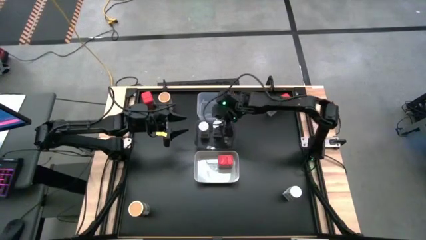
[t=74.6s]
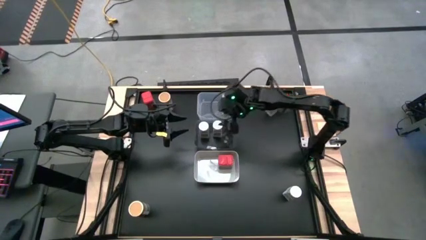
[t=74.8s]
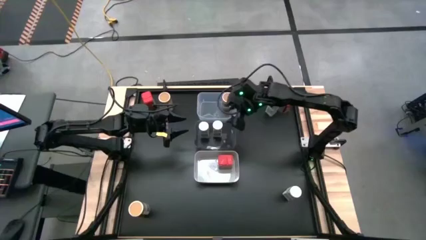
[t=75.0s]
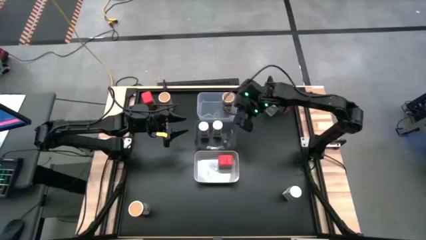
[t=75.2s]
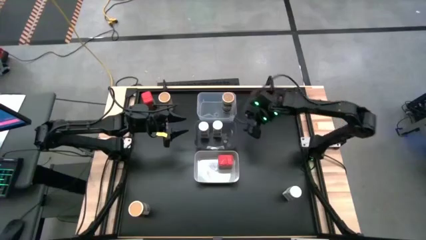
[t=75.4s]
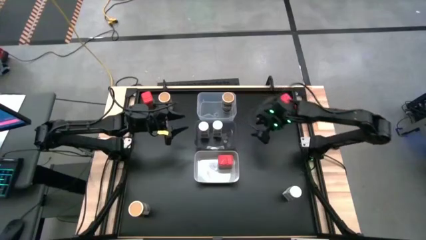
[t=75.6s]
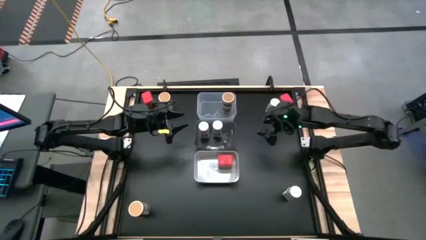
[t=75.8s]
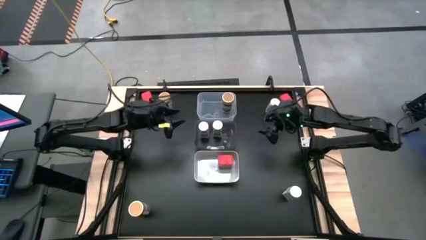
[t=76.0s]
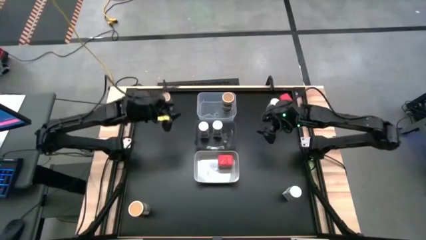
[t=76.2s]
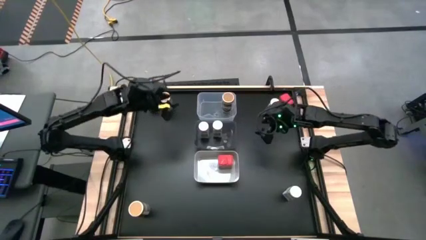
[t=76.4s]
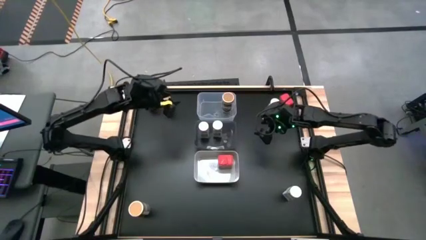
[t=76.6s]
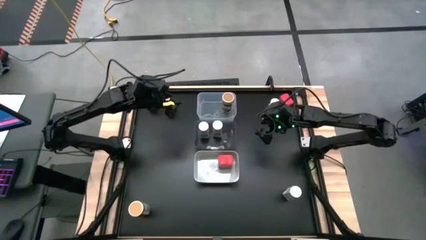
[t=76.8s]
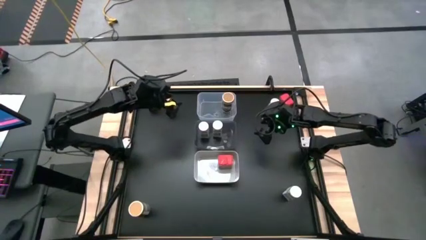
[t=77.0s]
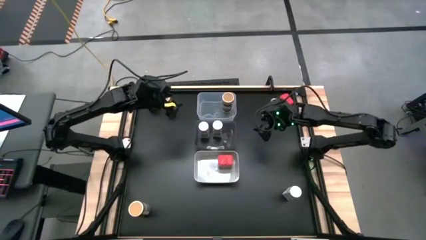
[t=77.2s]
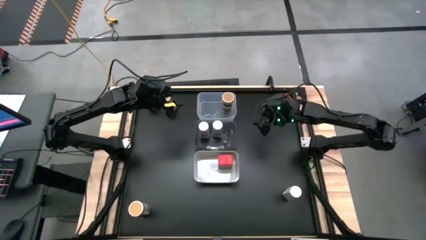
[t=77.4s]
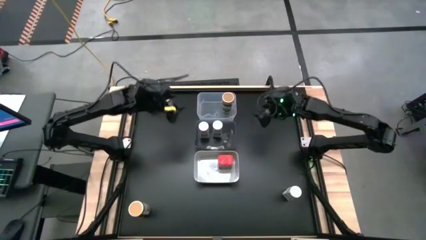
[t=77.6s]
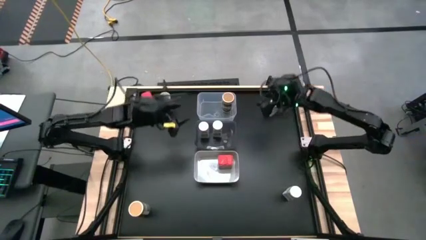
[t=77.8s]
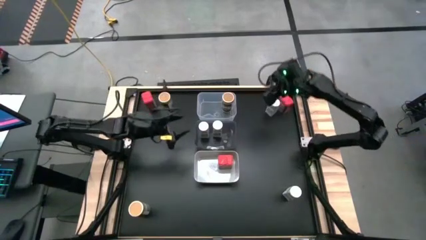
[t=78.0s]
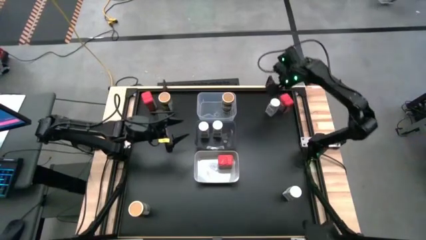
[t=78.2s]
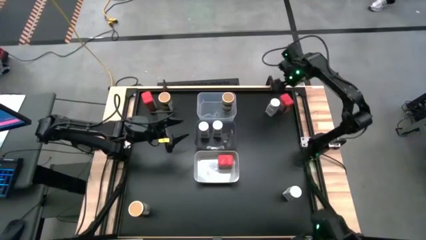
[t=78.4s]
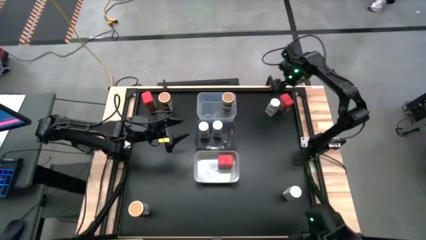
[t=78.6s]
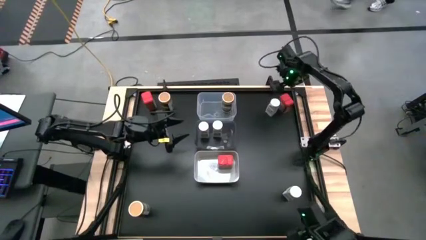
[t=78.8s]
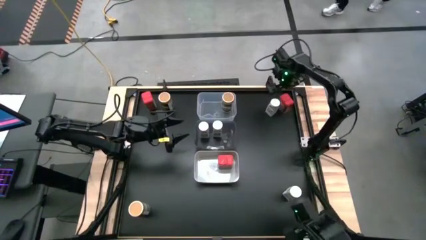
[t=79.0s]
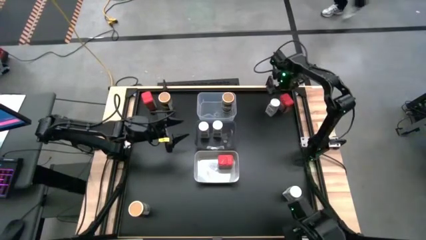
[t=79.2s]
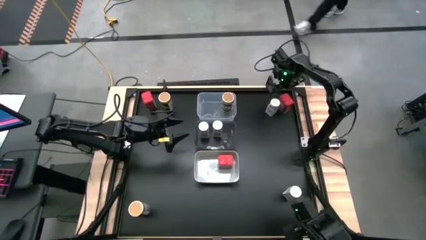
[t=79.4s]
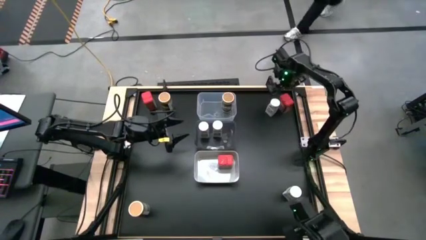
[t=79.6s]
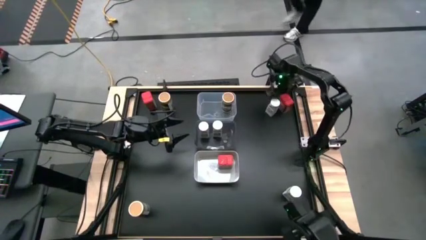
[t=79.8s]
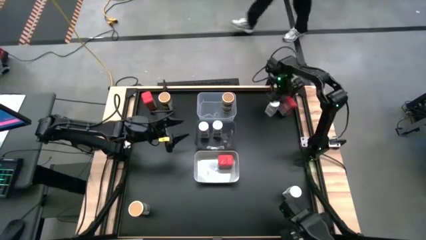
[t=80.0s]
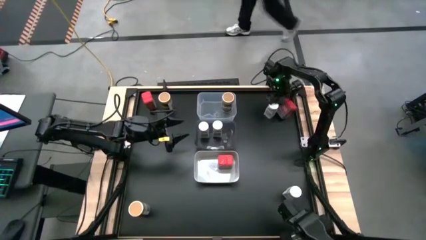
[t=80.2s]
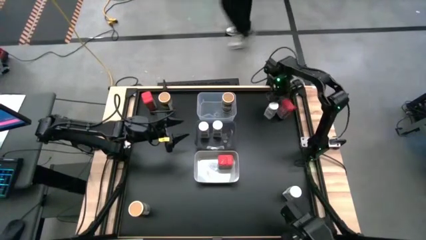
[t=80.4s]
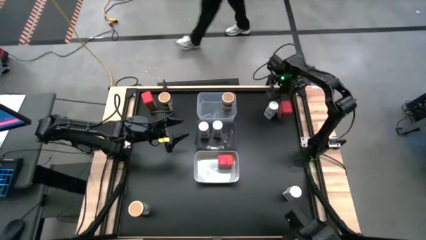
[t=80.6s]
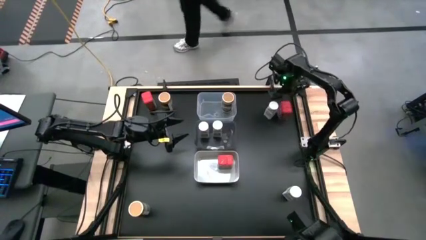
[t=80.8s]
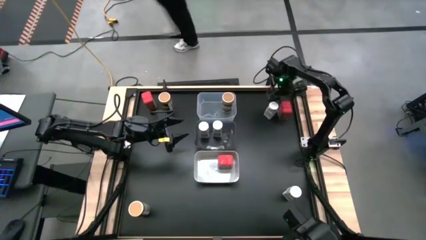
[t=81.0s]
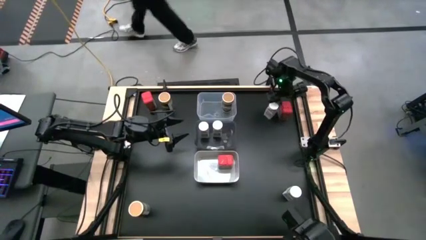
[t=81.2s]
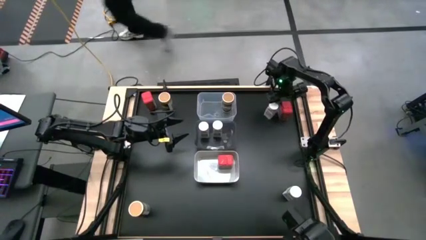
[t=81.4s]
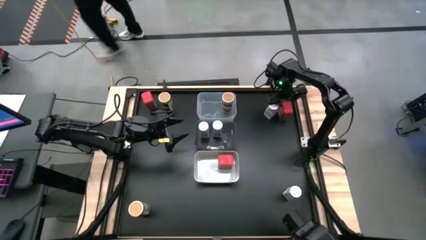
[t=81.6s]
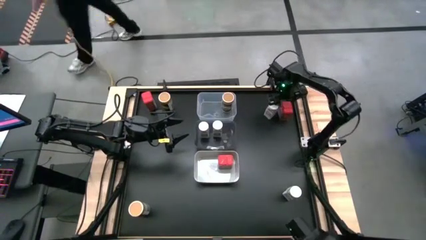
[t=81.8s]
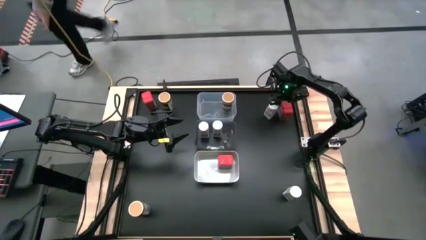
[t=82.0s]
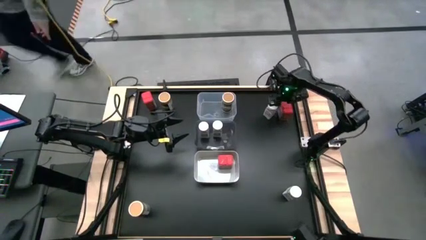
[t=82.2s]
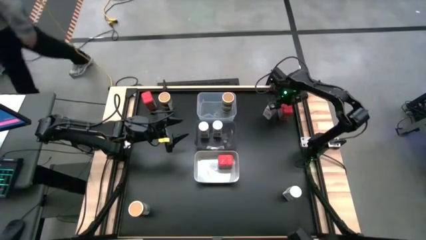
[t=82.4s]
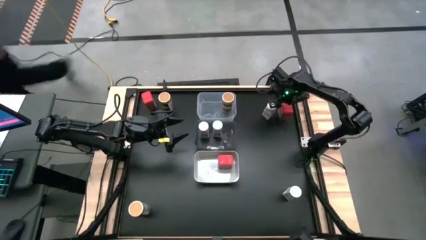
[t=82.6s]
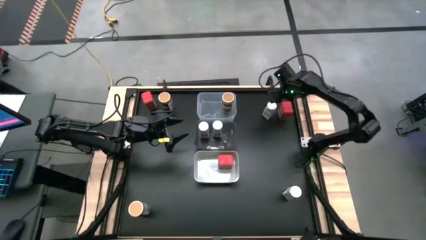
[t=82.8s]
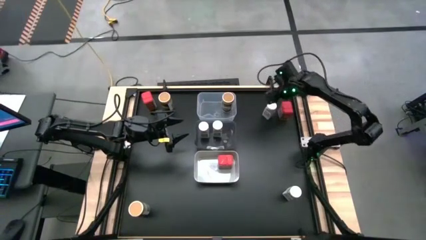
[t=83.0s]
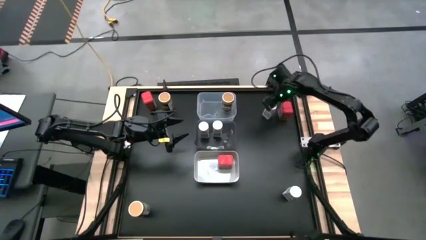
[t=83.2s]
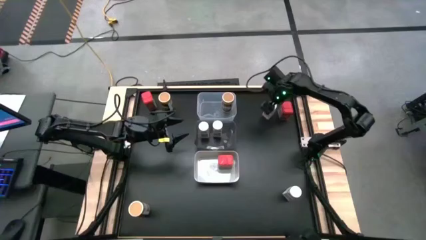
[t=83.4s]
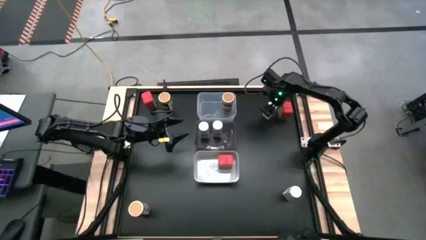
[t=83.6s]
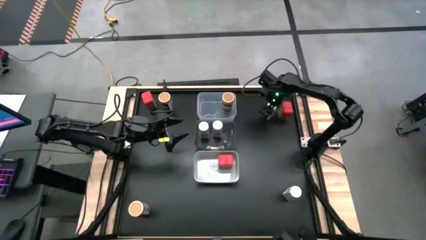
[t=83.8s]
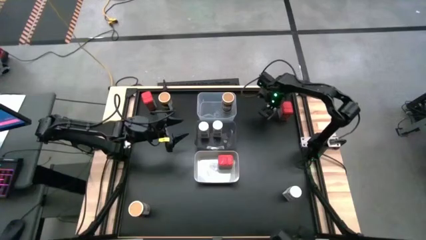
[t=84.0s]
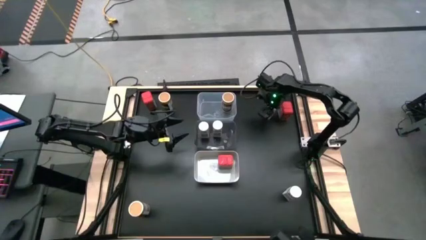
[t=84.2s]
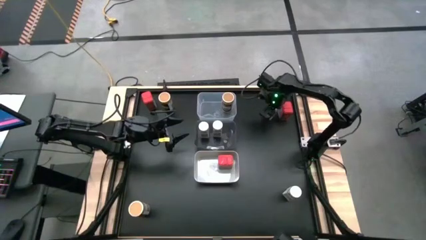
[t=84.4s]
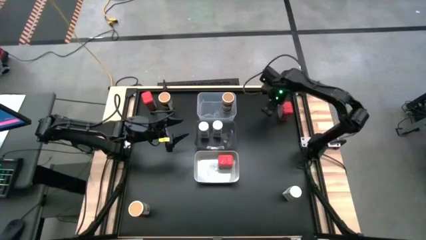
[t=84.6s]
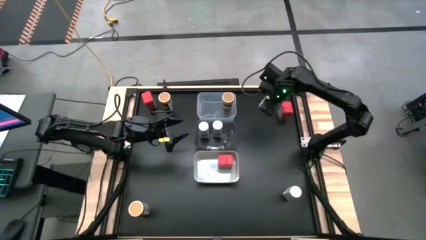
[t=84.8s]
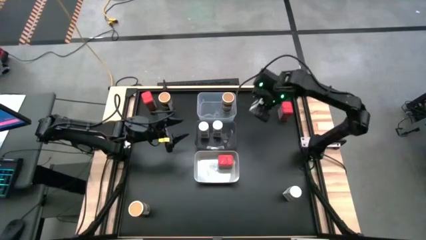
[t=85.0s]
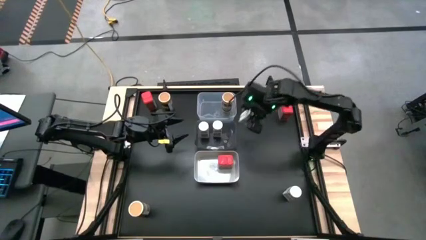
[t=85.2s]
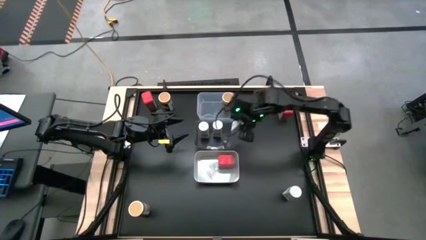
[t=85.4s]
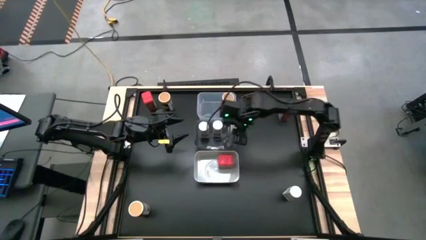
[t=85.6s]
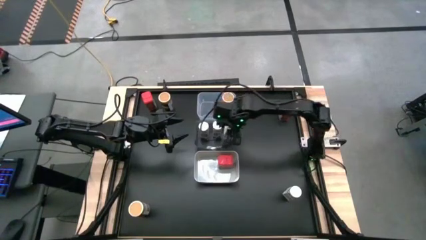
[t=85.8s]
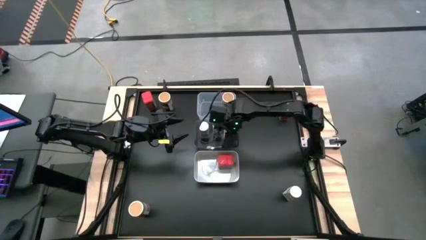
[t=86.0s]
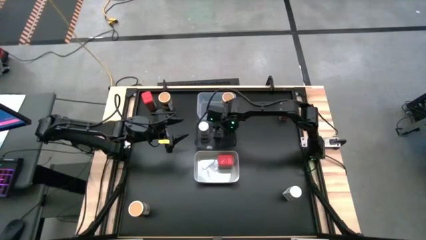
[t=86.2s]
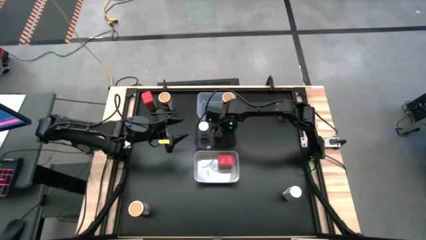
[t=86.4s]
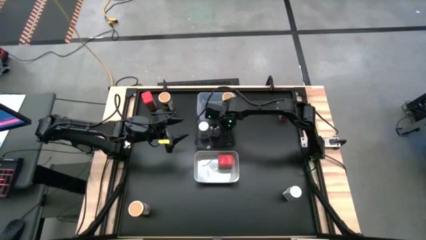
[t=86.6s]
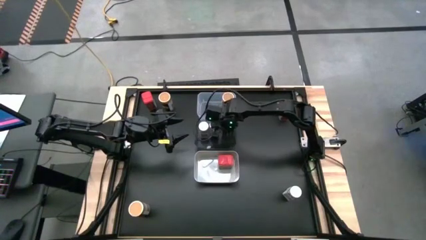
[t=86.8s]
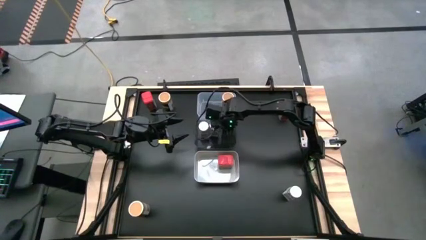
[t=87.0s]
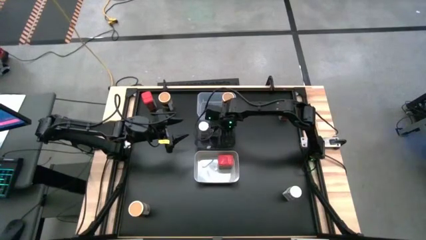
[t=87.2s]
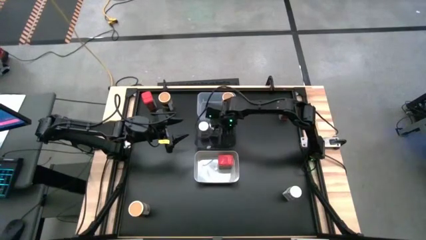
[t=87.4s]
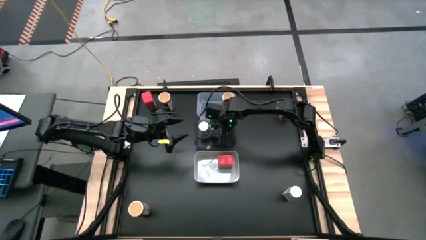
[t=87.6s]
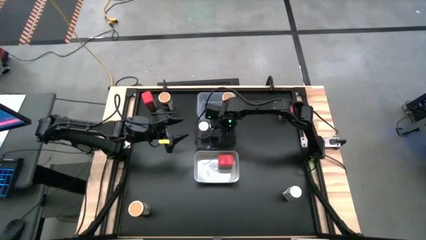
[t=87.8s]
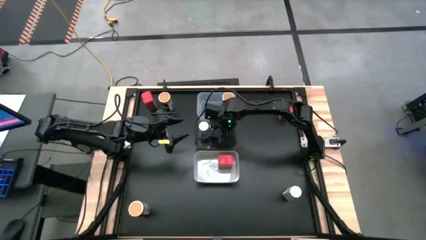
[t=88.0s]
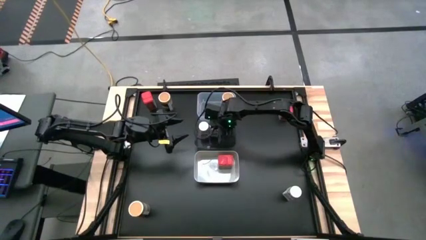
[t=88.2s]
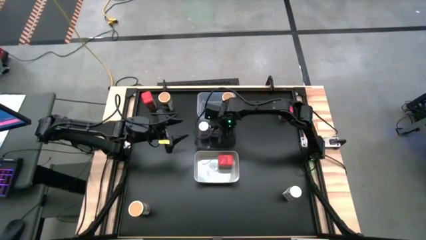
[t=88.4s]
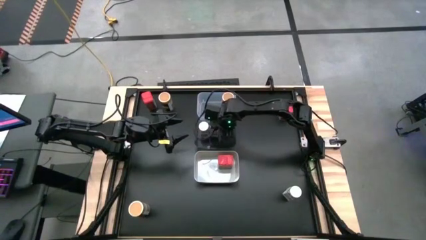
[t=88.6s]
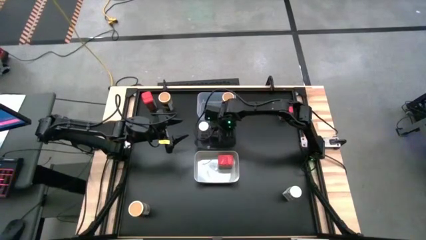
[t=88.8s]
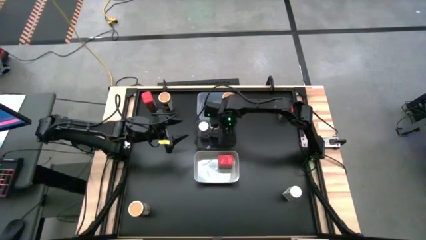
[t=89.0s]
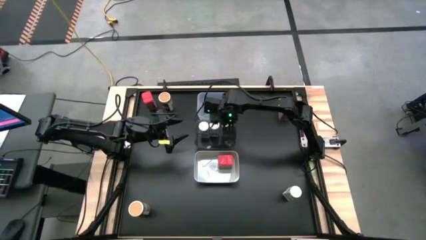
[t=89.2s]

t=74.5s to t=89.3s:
Task: Sort spices by type
Put the top white seasoning bottle into the black transparent bin aligned with the other white seasoning bottles
